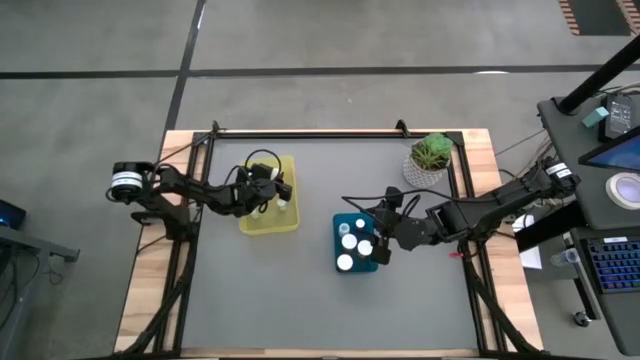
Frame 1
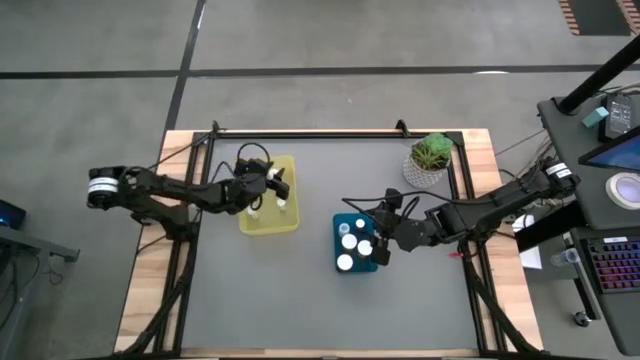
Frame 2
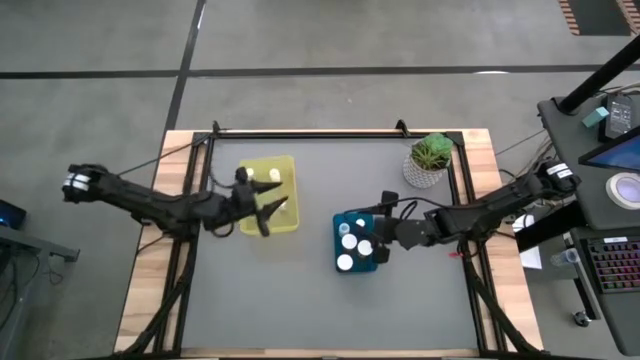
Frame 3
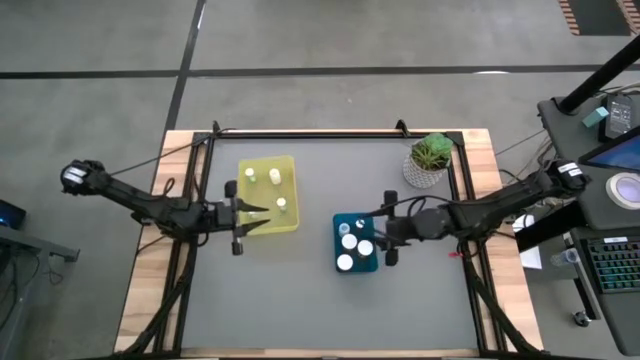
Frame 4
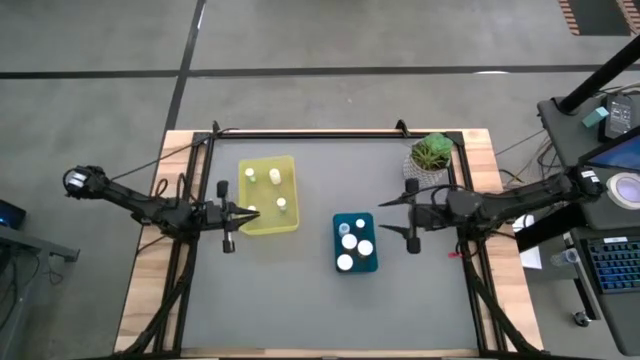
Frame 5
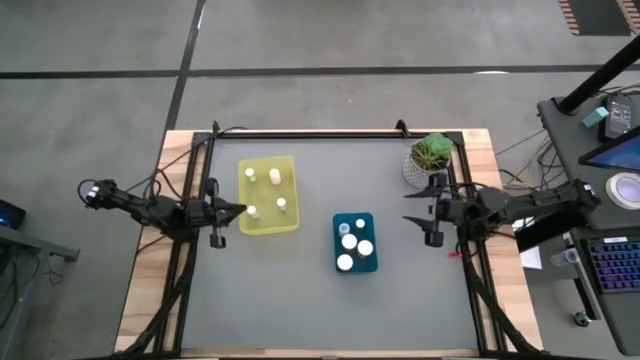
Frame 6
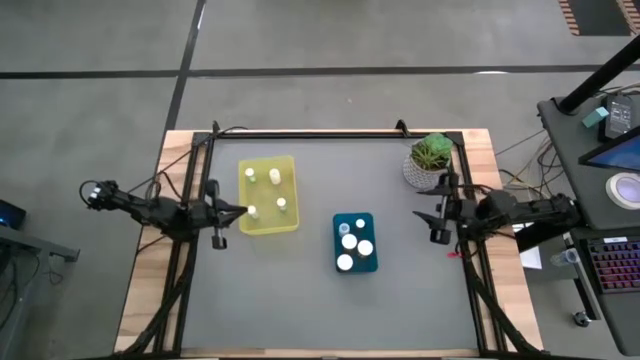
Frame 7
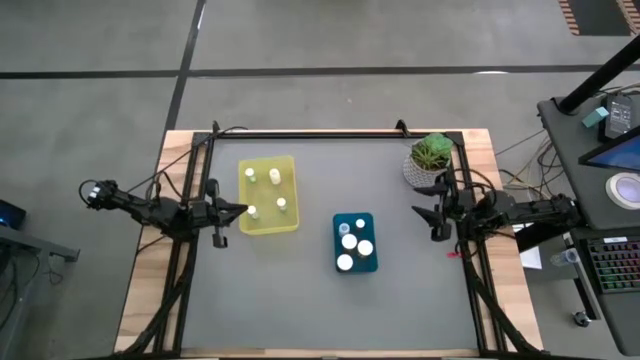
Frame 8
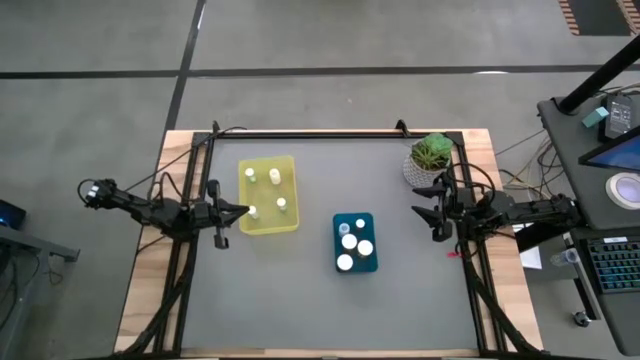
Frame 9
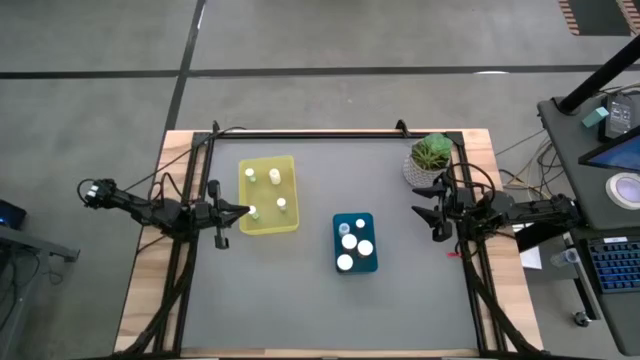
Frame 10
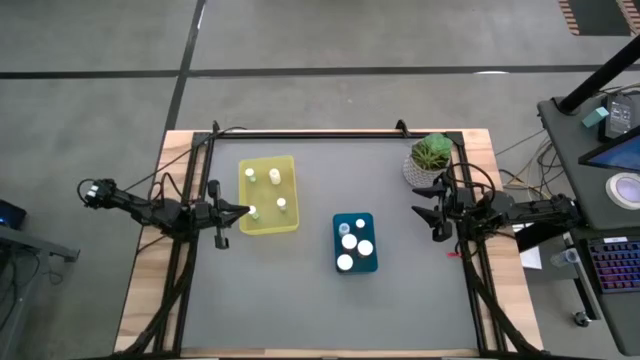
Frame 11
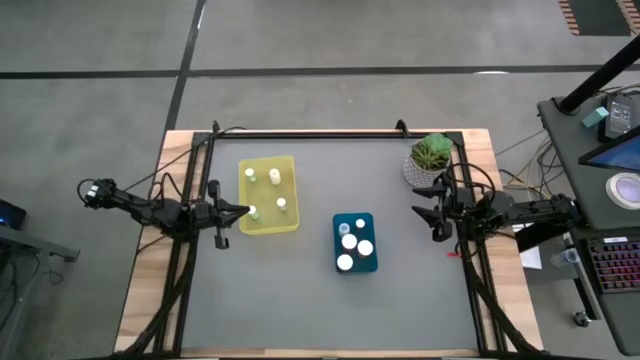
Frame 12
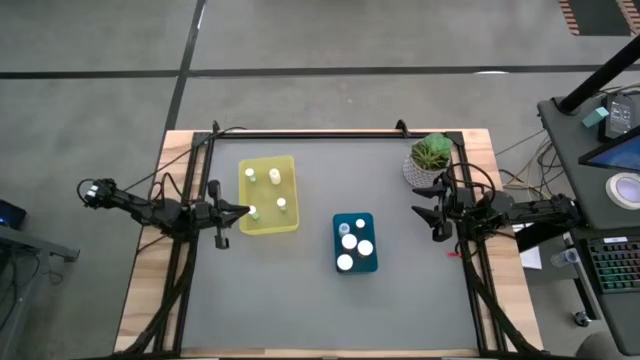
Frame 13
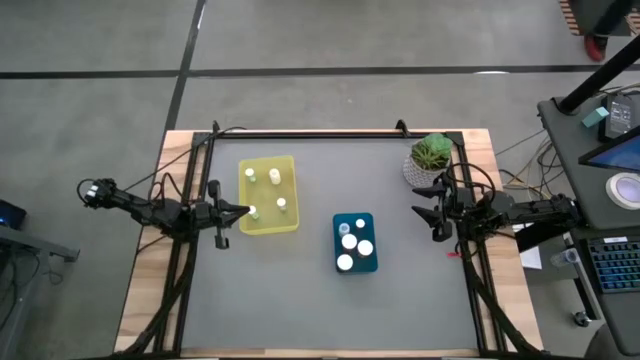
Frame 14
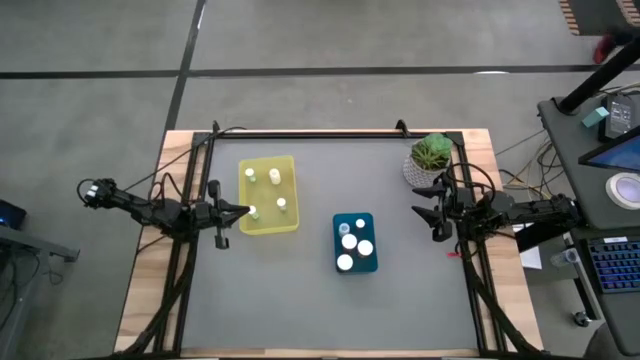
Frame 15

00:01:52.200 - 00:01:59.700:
Task: Pick and place medicine bottles into bin by pill shape (circle, oval)
Return to Home Position

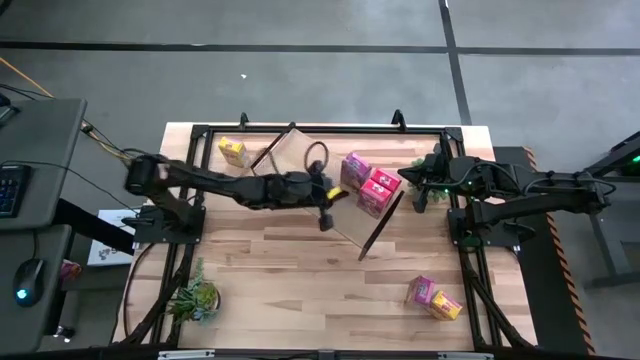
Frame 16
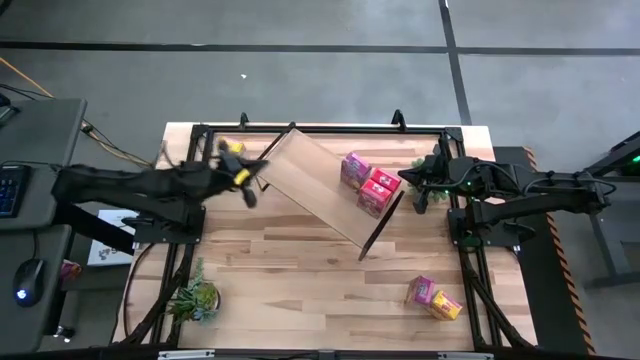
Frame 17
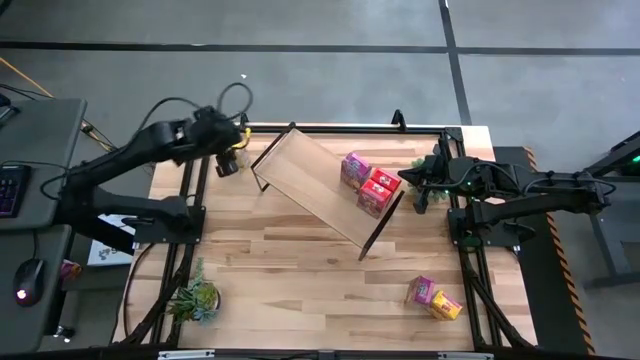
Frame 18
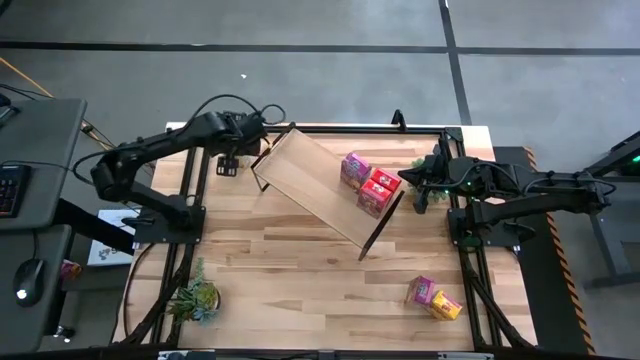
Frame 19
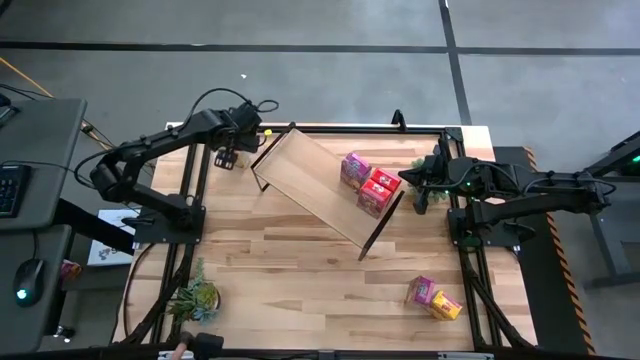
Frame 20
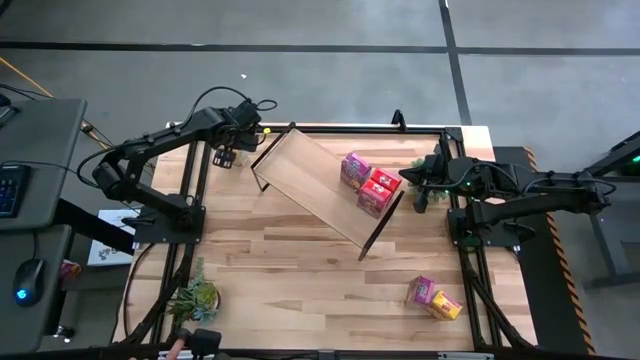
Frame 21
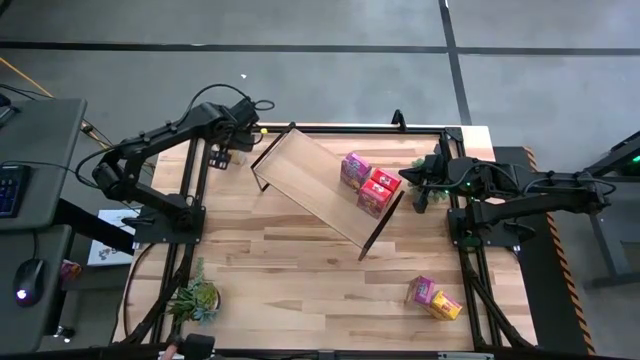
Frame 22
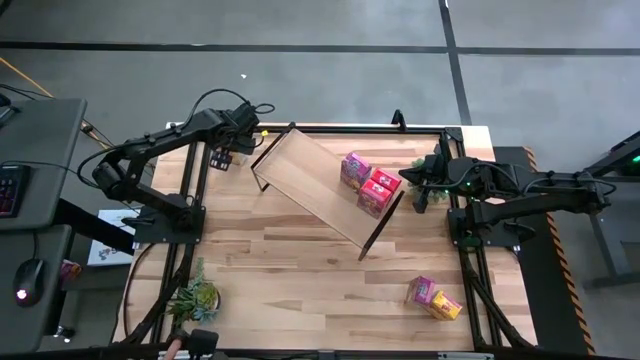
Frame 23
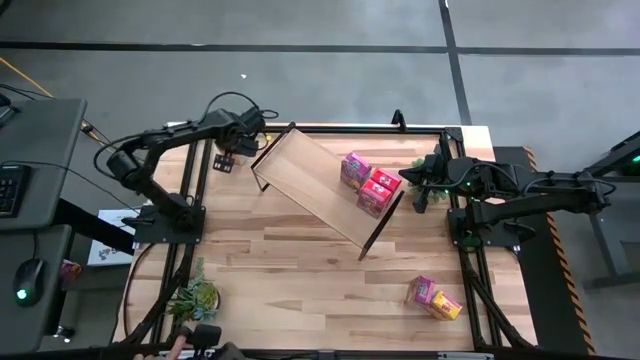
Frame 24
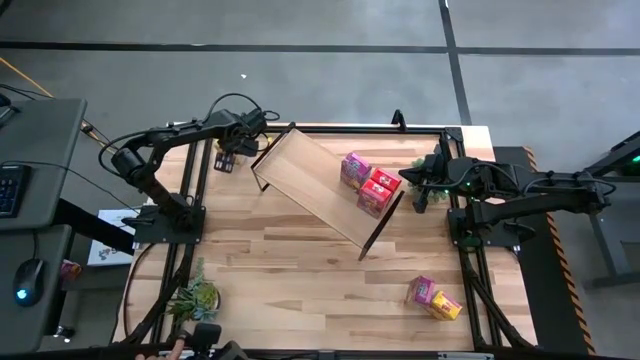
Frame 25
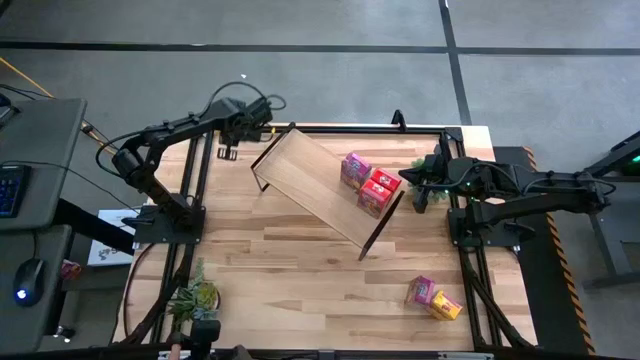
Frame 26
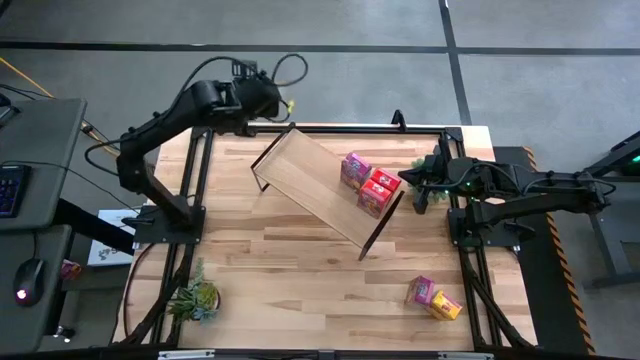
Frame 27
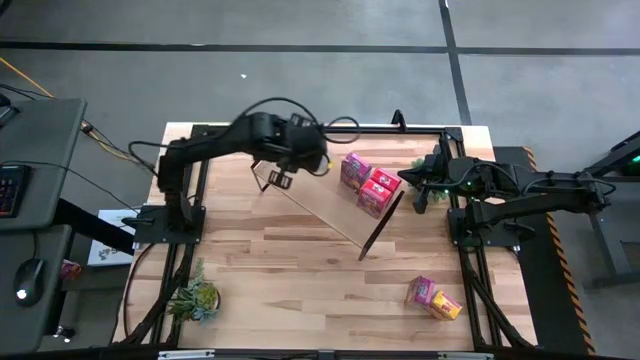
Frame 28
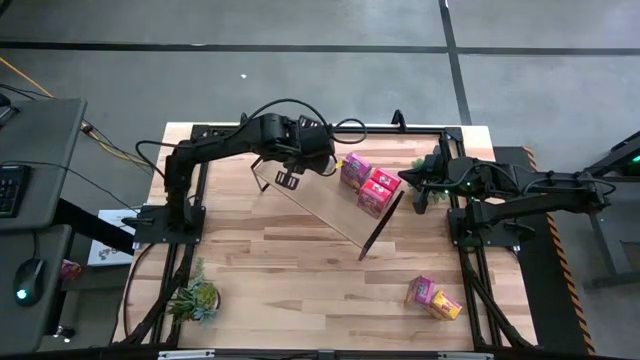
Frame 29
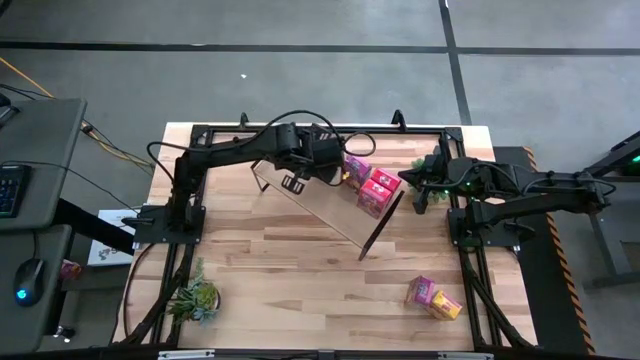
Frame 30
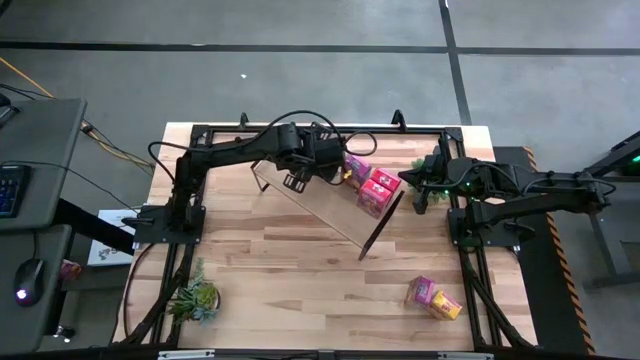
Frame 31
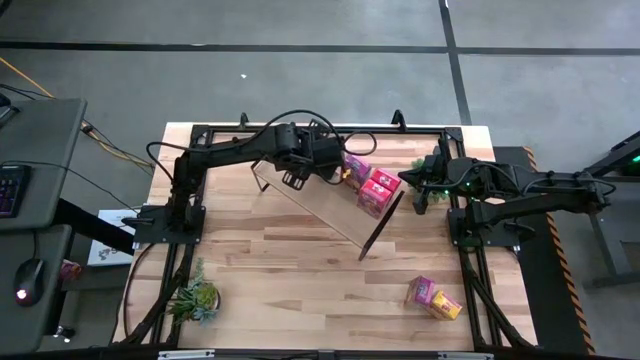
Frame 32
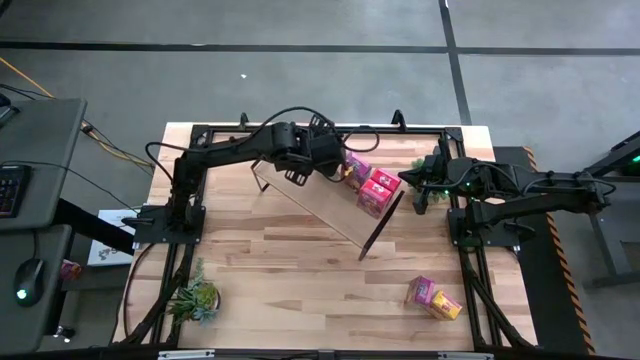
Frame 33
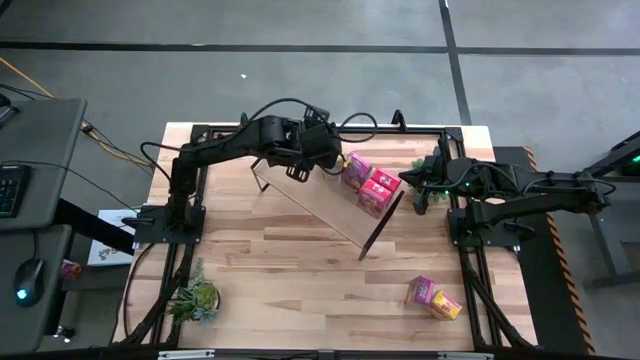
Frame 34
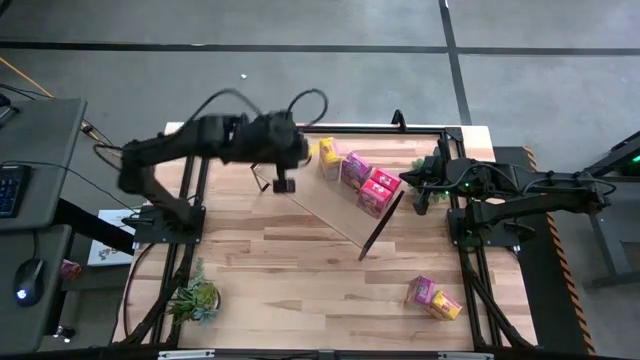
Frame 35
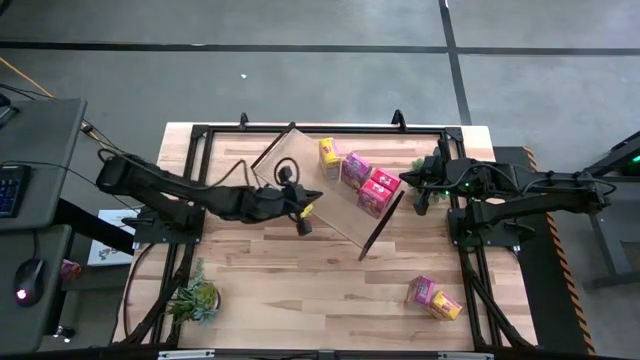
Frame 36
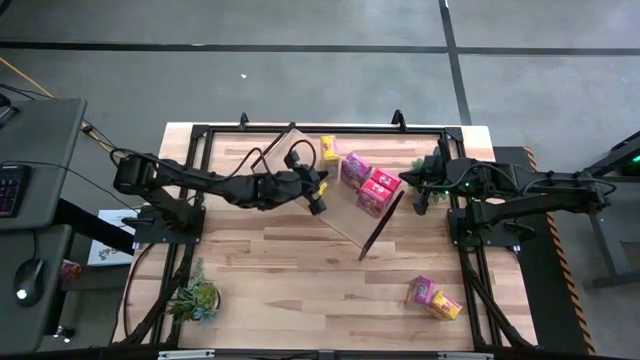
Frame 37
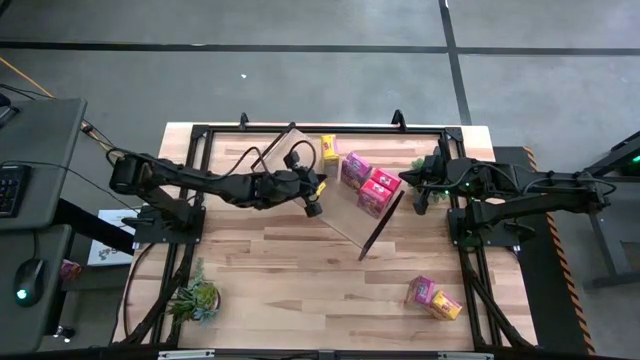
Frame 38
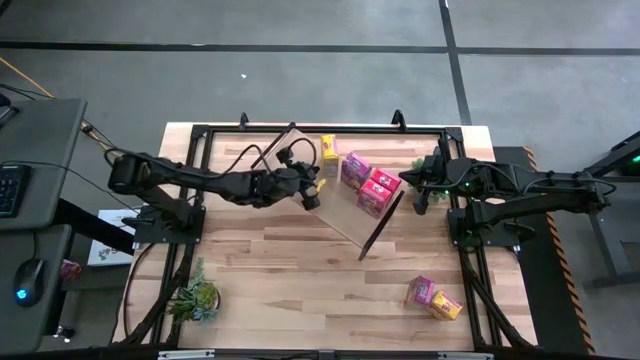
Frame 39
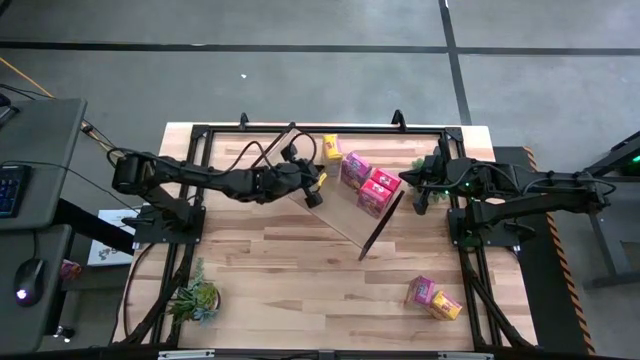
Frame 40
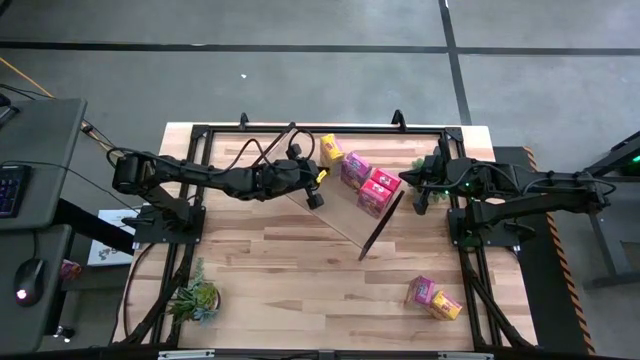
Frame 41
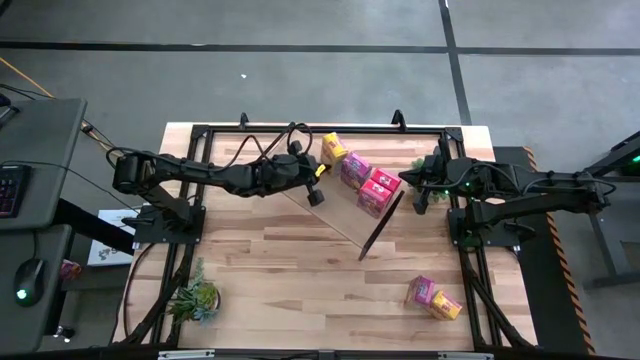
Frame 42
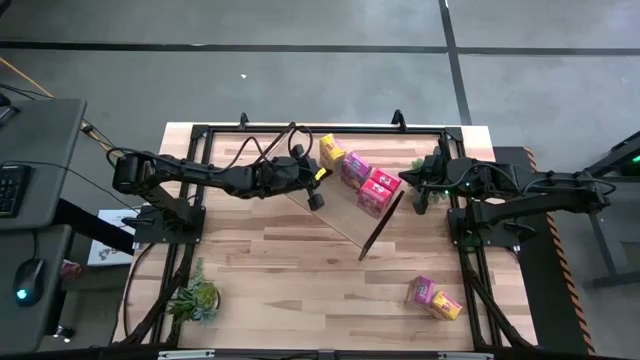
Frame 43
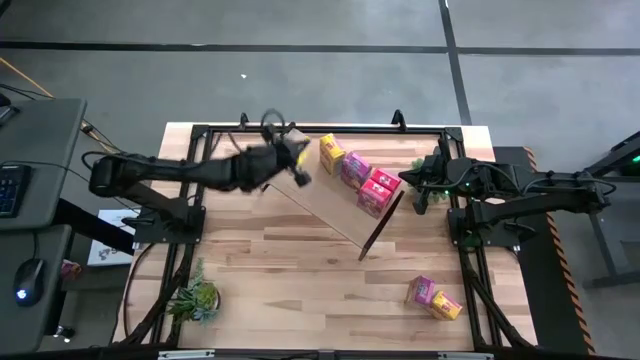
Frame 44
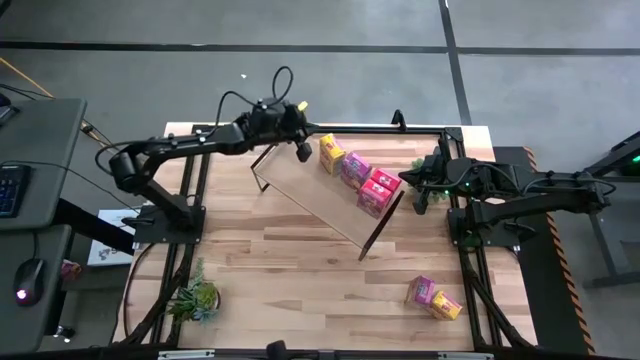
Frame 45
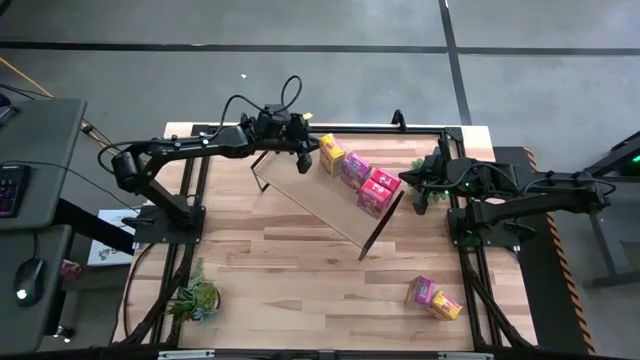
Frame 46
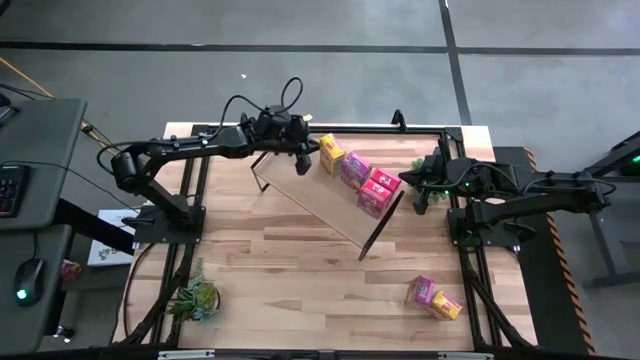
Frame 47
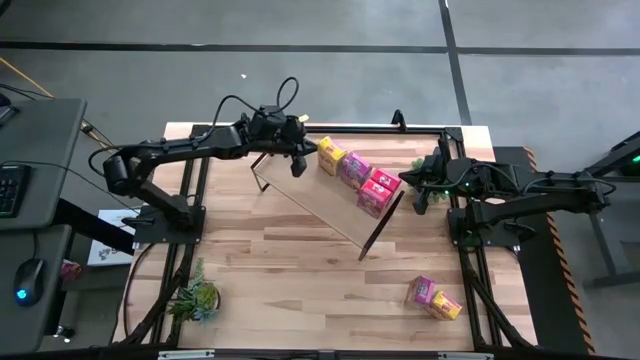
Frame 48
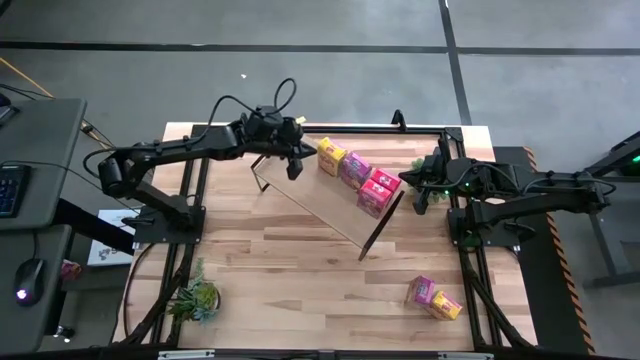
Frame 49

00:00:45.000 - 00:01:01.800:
Task: Stack cereal on shelf
Put the top yellow cereal box on the shelf
